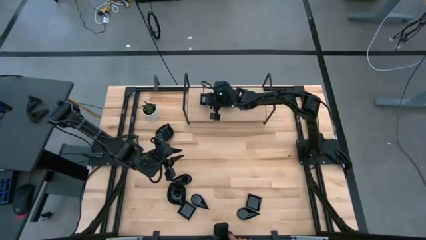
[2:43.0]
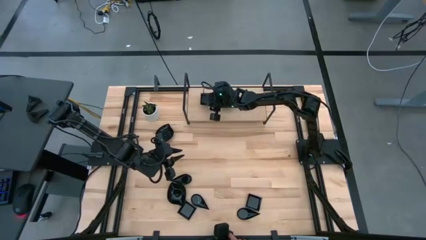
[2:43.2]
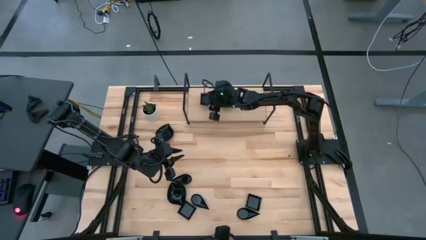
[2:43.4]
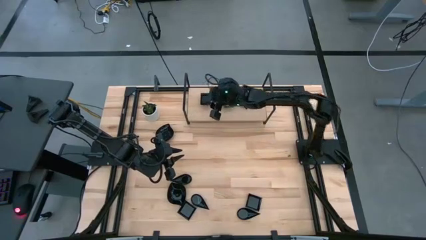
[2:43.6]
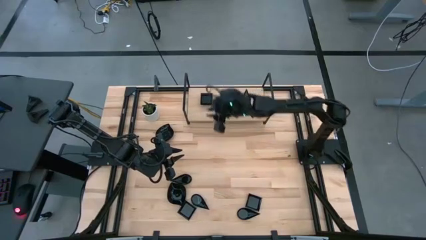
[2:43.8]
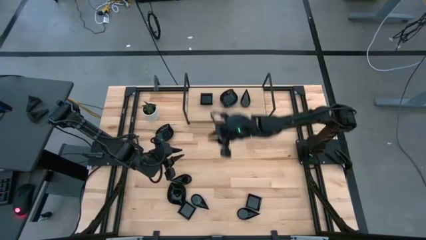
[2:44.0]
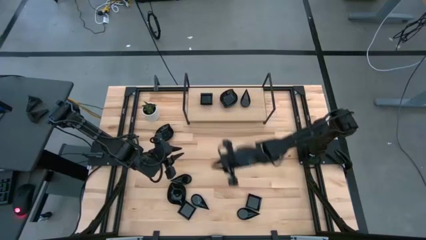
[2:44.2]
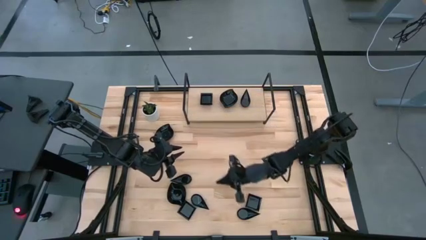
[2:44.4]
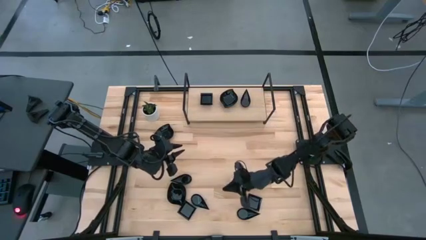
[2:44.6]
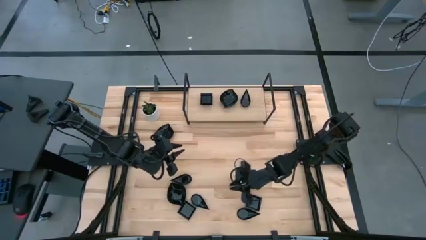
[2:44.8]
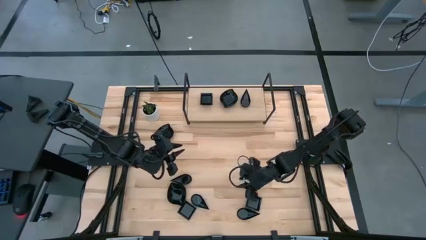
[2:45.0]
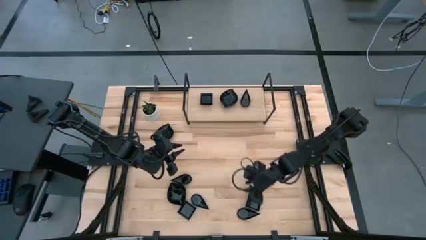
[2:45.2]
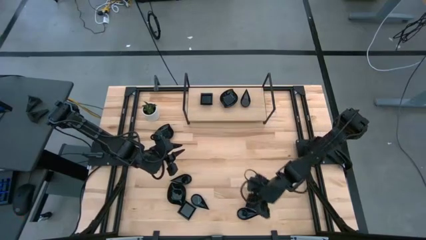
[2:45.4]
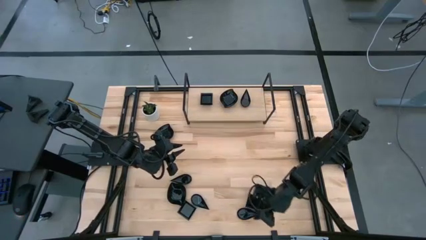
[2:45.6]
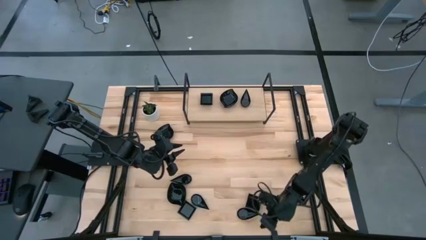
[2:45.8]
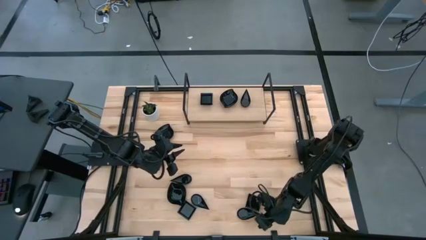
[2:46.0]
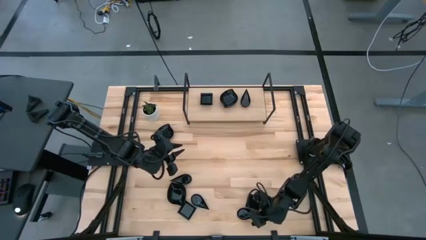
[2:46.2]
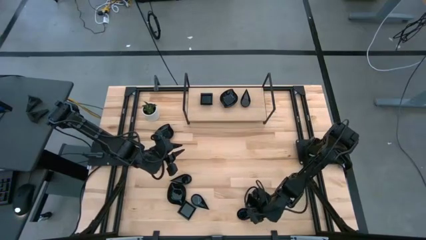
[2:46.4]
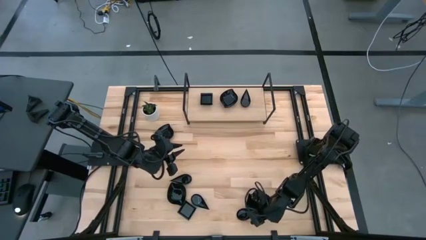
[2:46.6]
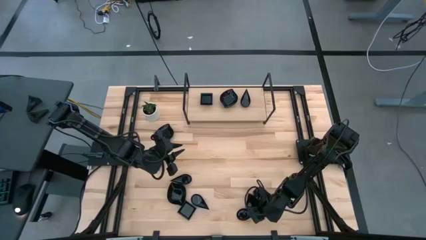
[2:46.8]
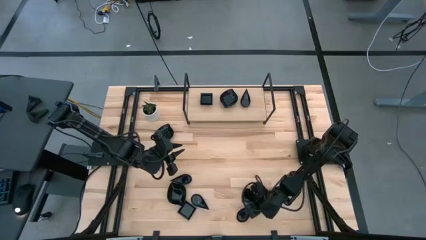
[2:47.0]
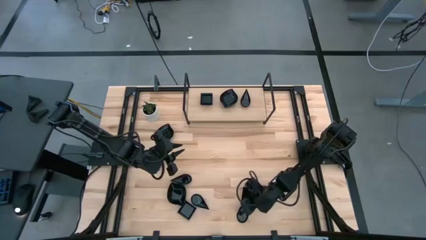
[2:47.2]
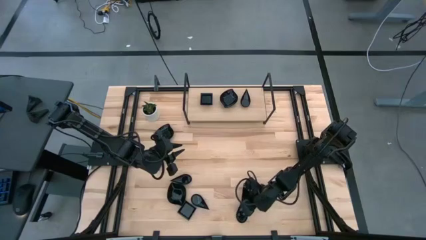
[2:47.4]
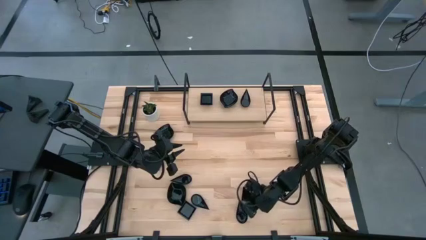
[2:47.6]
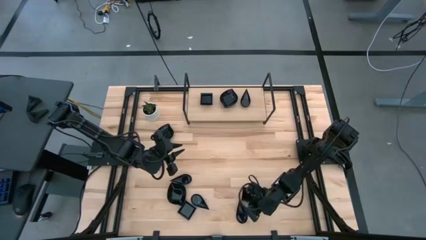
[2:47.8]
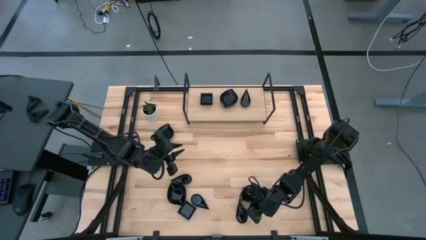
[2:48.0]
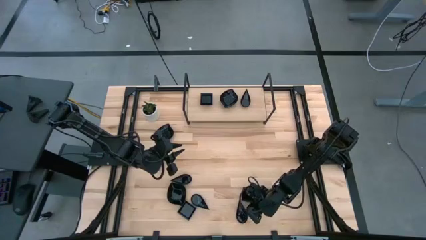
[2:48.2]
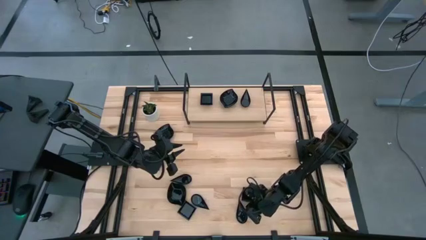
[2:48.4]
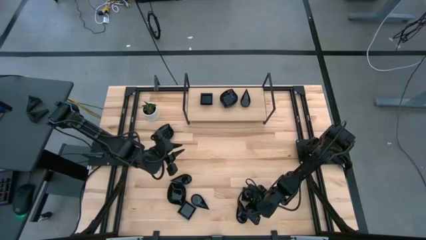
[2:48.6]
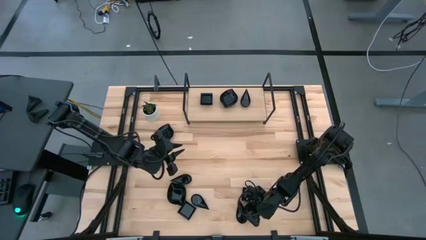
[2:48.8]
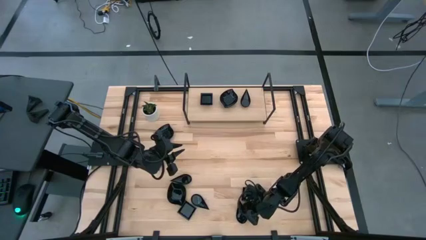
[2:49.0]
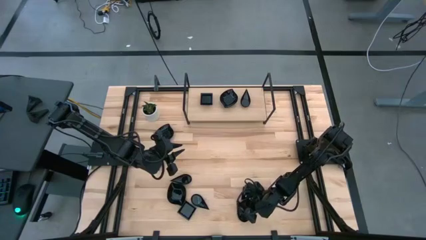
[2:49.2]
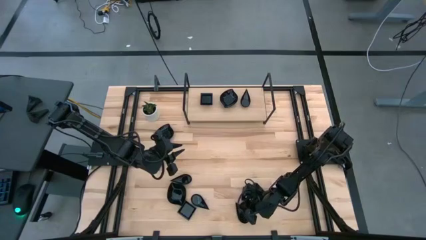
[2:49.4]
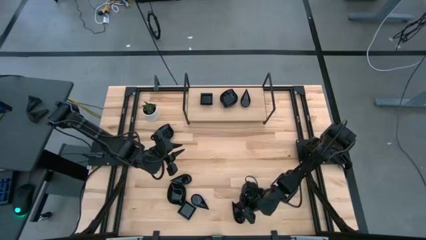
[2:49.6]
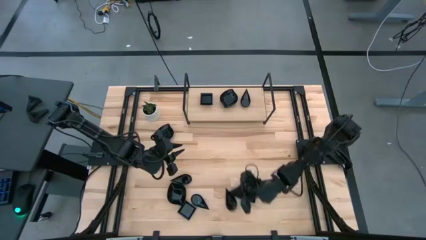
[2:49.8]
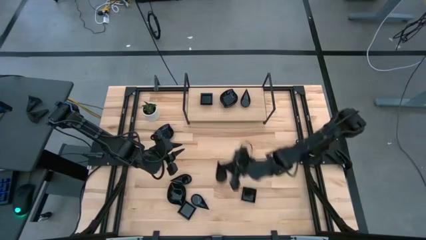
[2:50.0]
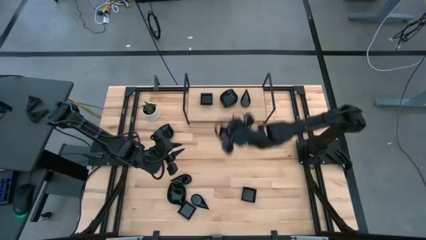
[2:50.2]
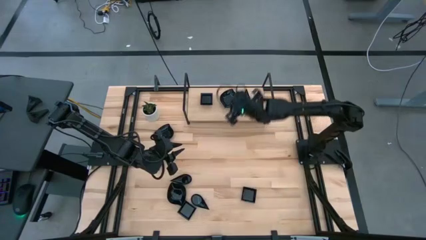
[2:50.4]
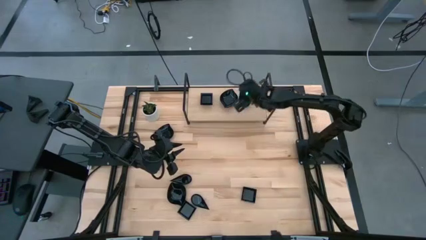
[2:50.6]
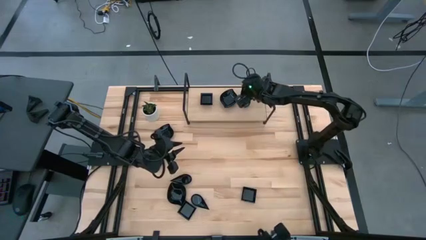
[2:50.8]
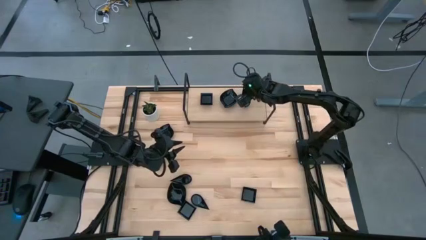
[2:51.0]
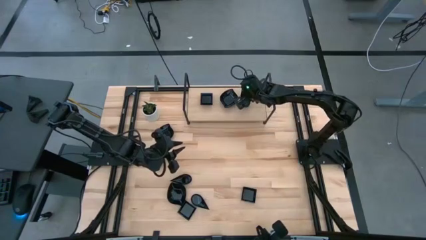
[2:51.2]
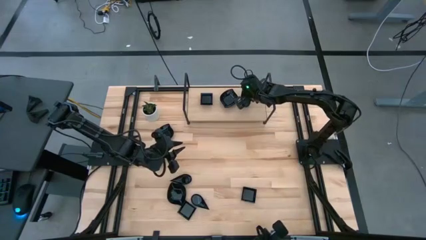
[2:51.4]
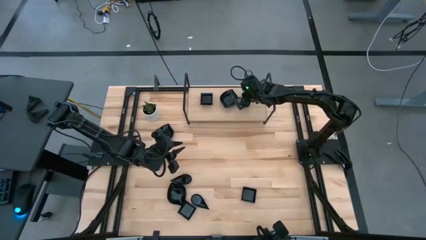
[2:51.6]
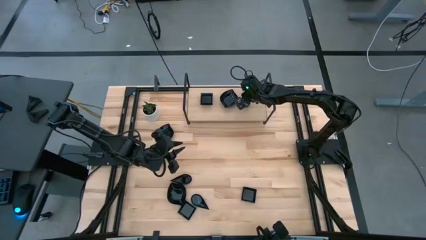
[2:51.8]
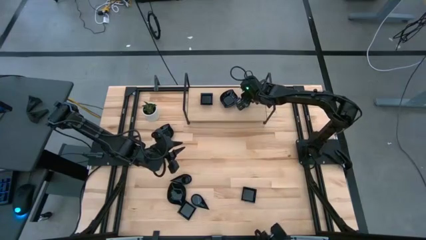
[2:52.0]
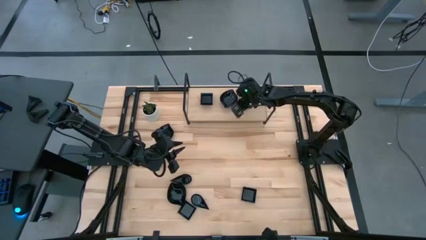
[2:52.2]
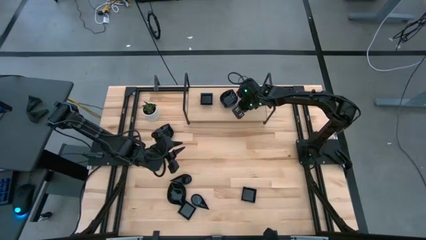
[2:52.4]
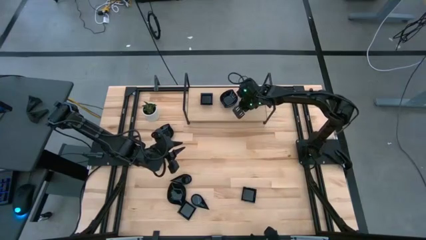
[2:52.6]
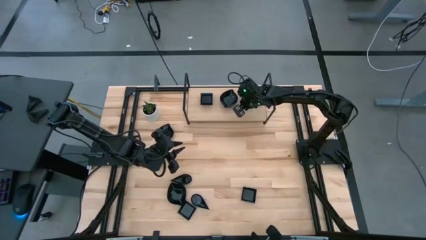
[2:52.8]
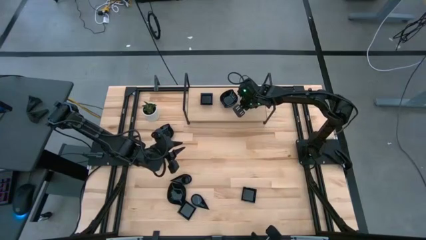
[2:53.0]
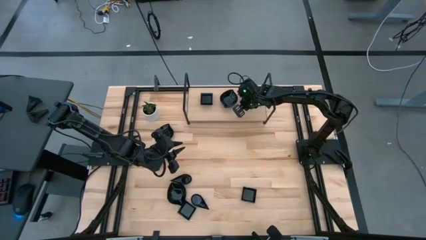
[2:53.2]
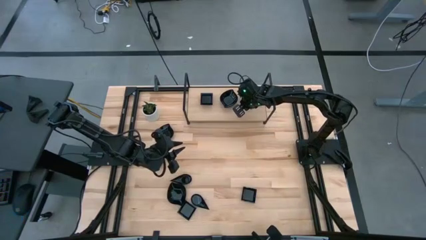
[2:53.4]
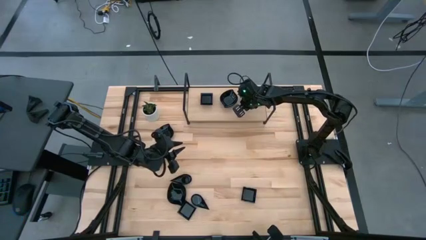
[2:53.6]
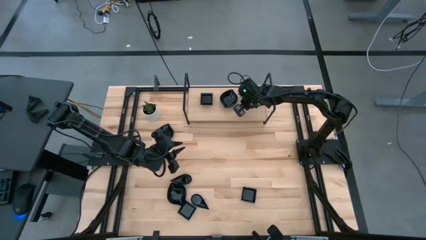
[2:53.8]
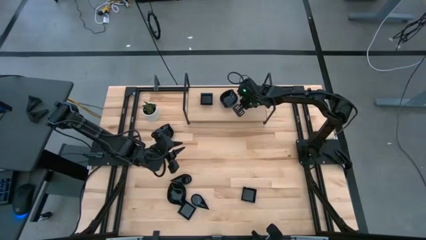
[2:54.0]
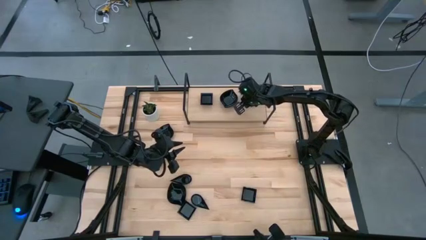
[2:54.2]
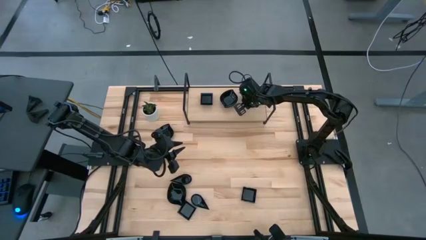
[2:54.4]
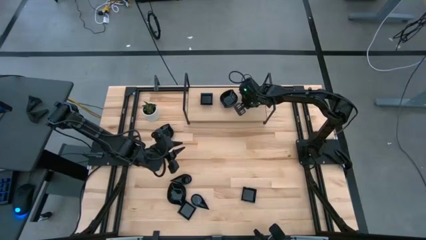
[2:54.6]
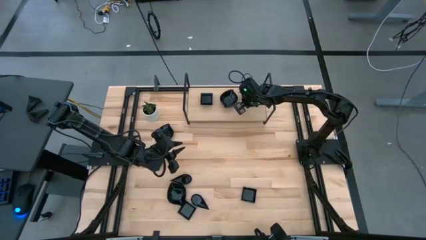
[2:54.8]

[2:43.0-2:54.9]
Task: Pick & Place Mini shaped plates
Stack the black teardrop shaped bowl on top of the other black teardrop shape bowl on the shelf

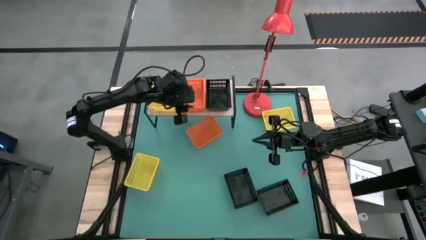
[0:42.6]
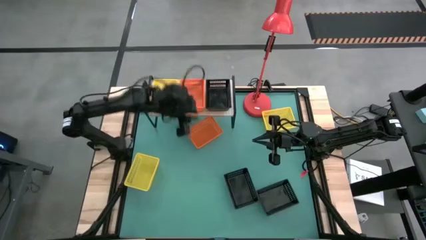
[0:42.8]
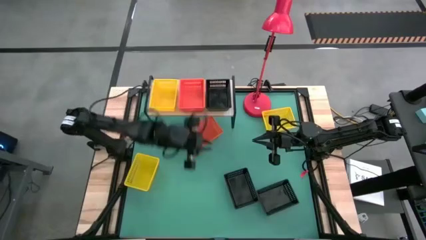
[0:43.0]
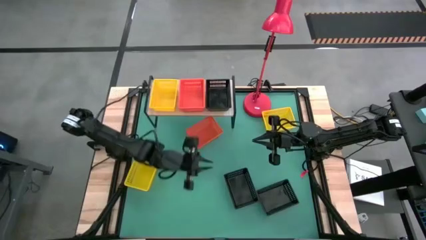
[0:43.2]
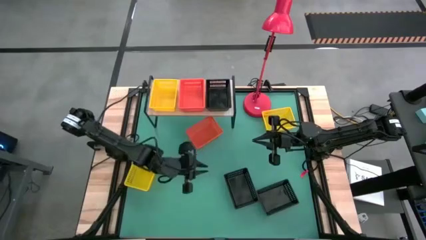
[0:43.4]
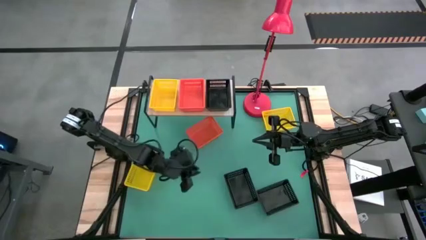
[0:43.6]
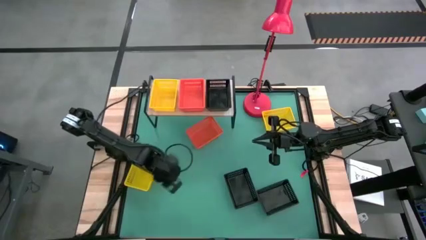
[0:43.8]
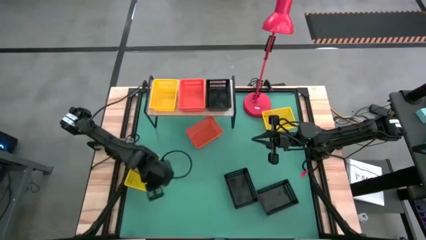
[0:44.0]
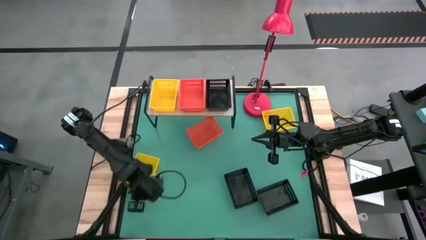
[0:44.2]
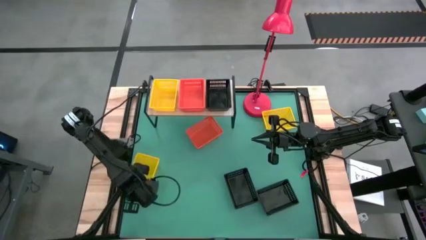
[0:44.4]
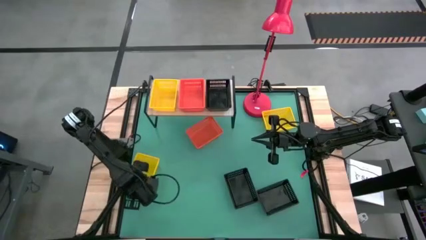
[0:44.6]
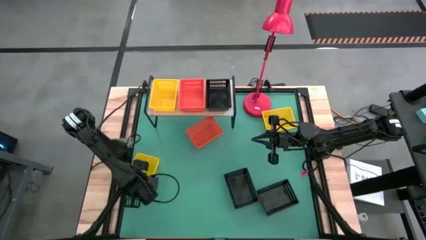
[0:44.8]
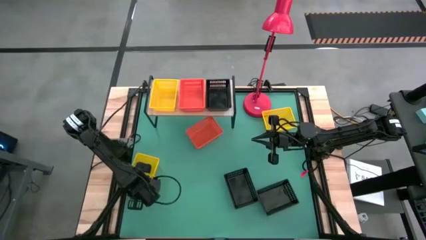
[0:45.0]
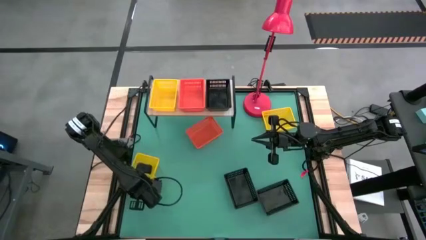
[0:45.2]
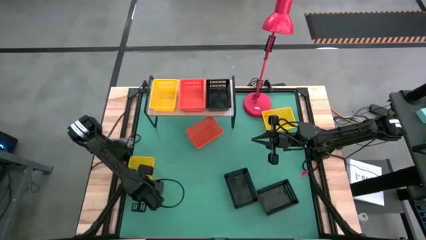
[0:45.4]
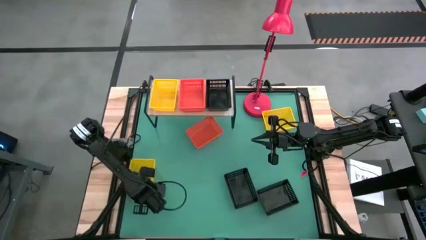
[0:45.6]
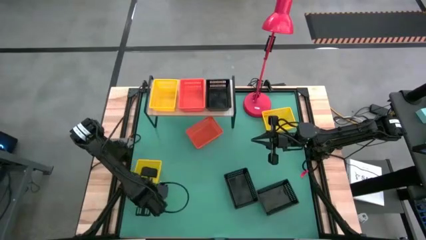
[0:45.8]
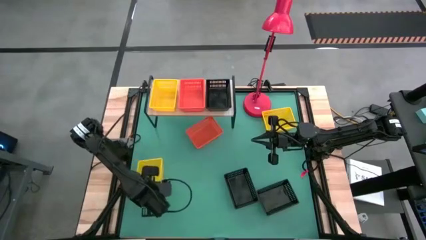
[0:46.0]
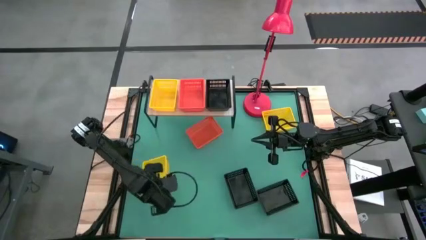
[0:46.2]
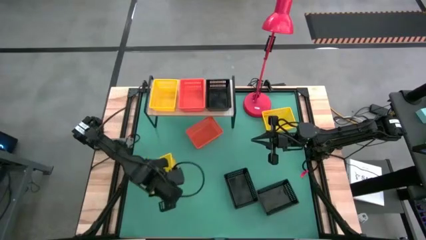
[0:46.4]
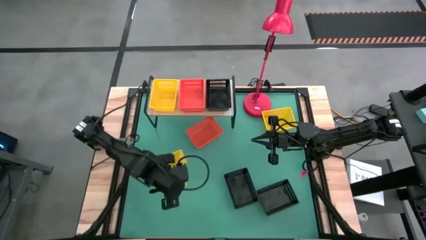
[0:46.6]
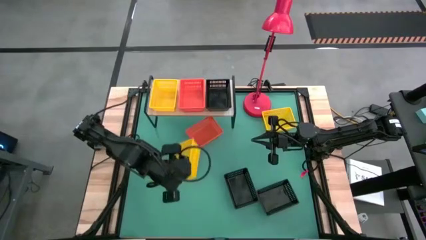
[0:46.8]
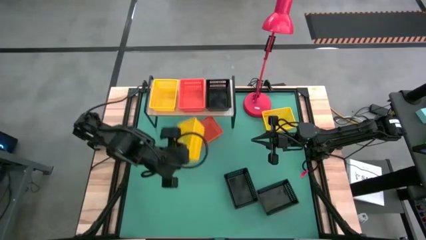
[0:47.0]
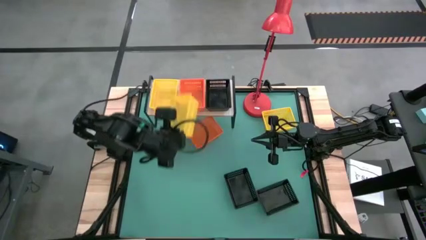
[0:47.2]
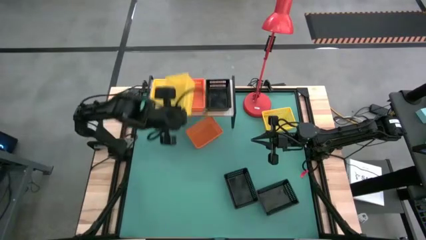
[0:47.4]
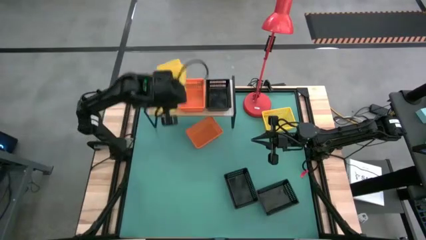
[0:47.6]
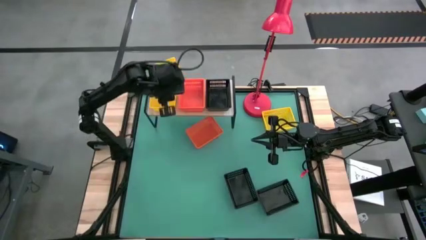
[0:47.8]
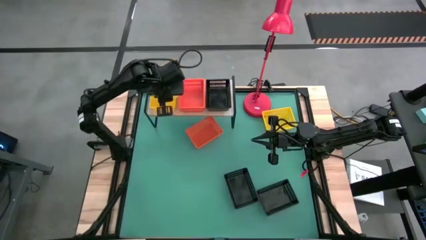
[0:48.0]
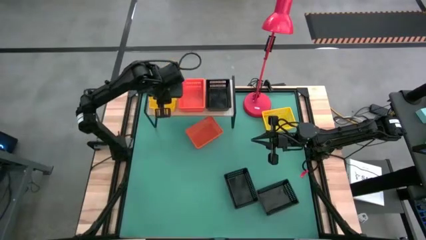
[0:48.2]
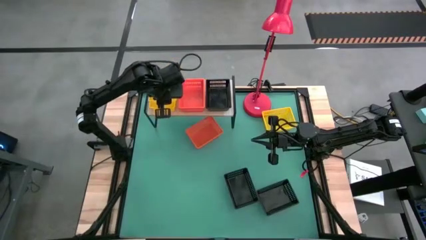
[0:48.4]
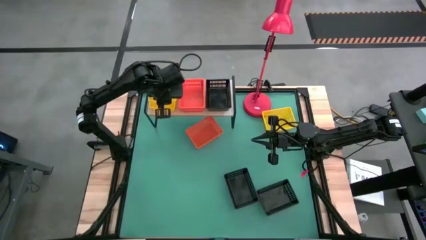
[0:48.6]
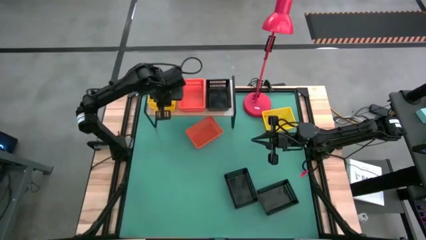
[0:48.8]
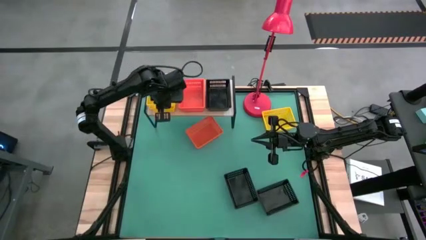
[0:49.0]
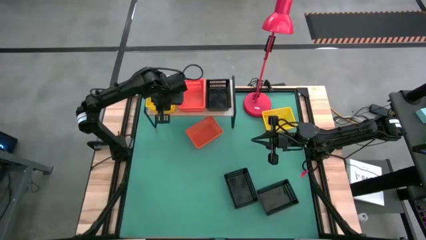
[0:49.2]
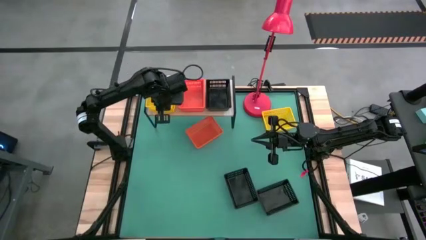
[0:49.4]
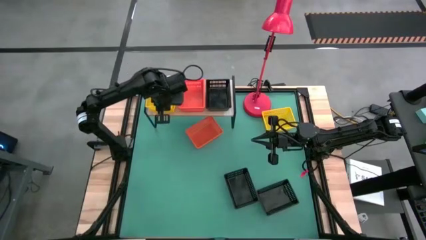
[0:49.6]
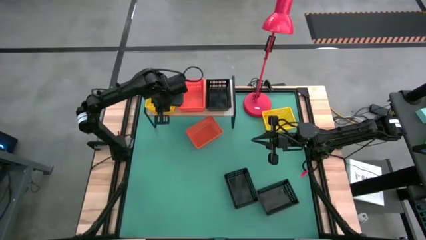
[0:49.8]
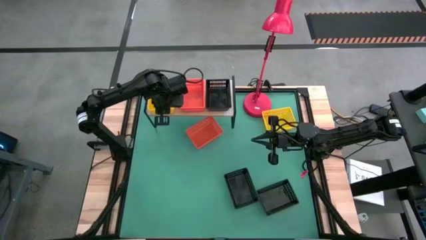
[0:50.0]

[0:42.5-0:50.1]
Task: Stack baskets on shelf by color
Stack the left yellow bin on top of the yellow bin on the shelf
